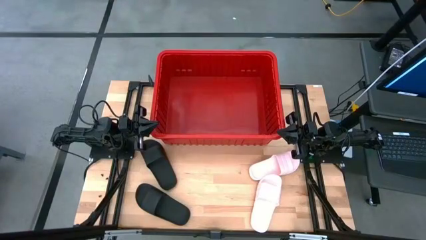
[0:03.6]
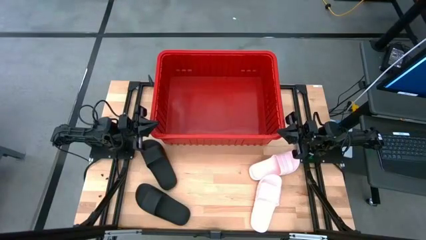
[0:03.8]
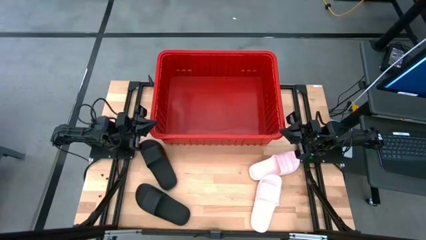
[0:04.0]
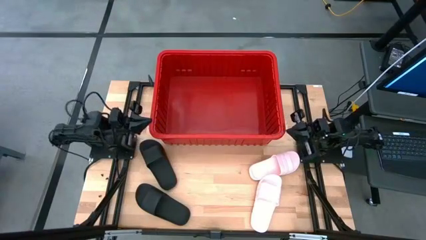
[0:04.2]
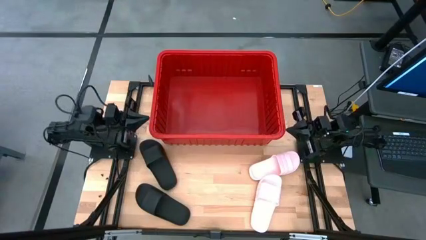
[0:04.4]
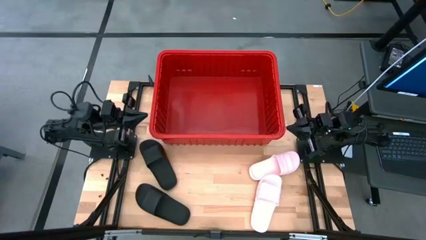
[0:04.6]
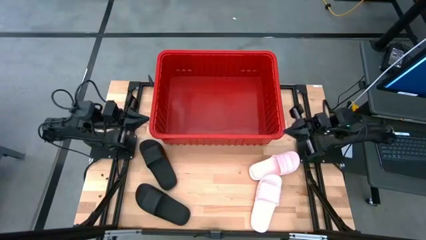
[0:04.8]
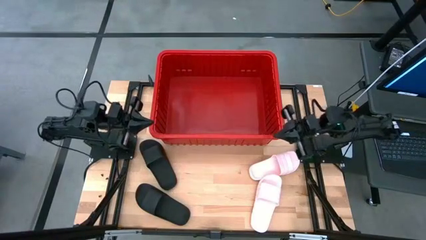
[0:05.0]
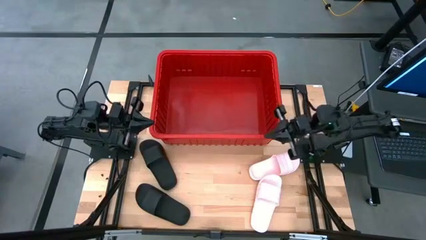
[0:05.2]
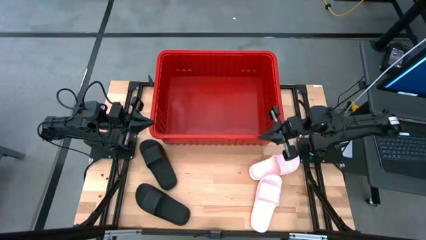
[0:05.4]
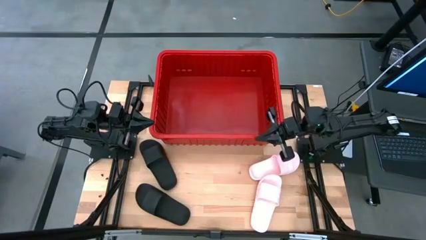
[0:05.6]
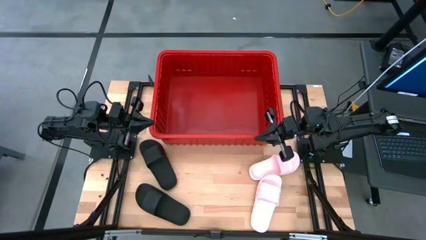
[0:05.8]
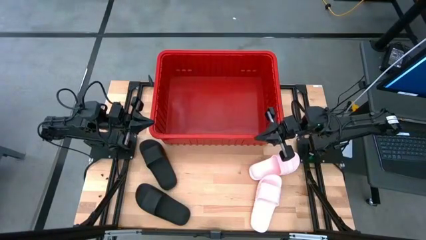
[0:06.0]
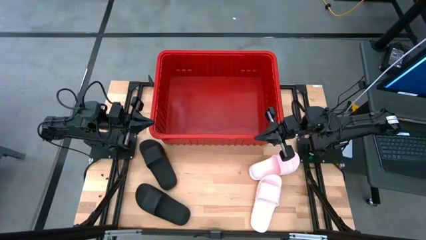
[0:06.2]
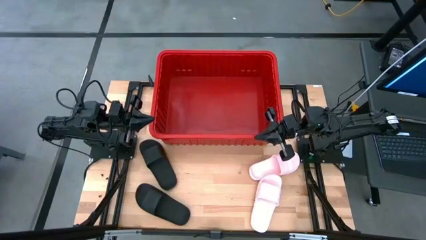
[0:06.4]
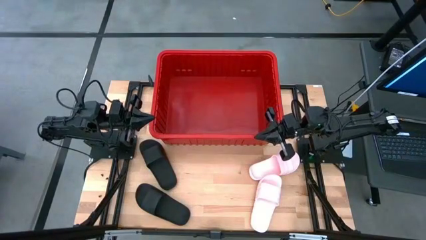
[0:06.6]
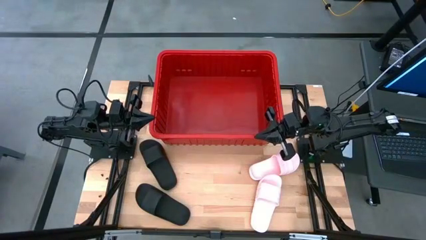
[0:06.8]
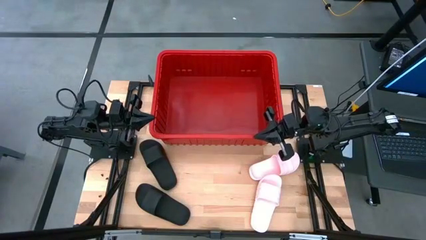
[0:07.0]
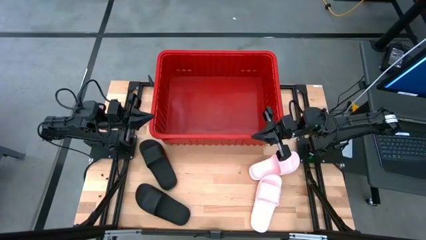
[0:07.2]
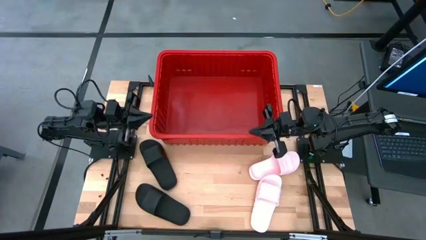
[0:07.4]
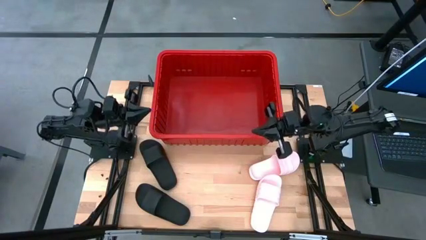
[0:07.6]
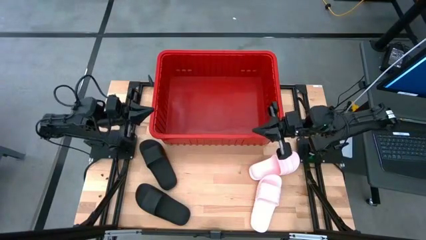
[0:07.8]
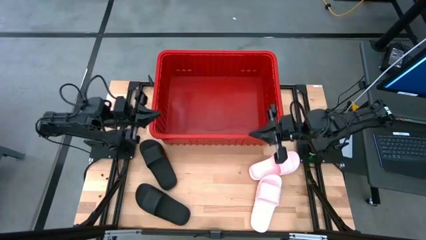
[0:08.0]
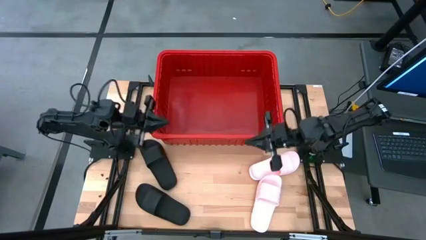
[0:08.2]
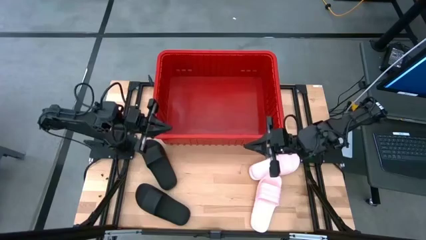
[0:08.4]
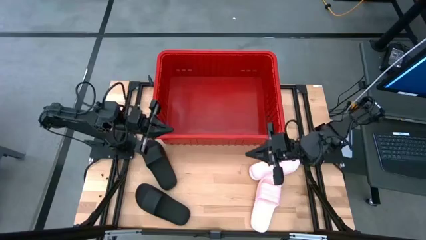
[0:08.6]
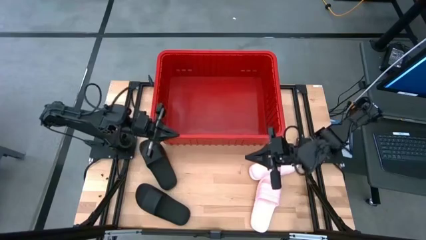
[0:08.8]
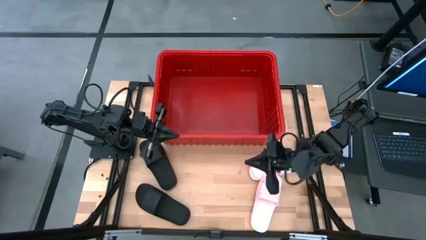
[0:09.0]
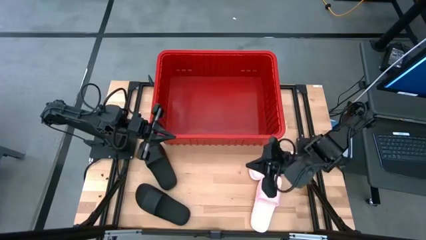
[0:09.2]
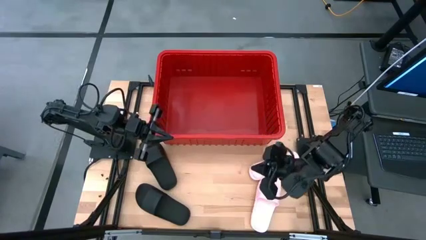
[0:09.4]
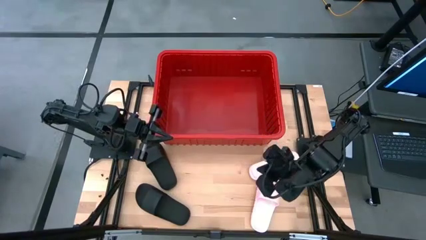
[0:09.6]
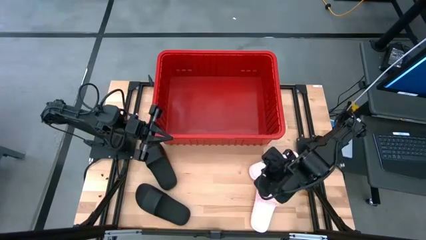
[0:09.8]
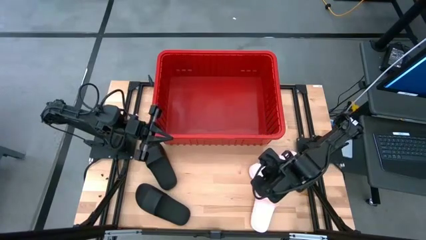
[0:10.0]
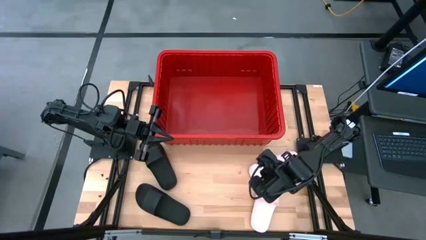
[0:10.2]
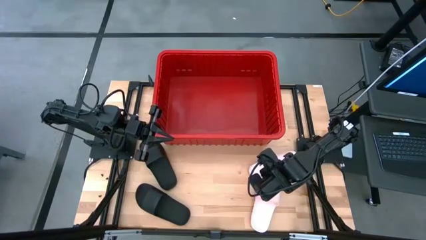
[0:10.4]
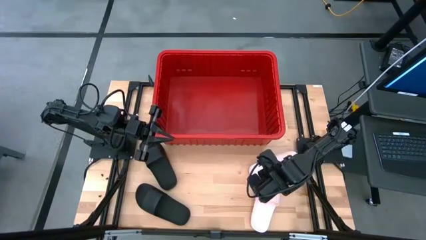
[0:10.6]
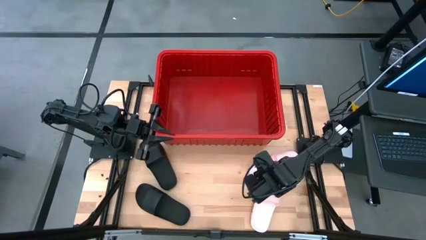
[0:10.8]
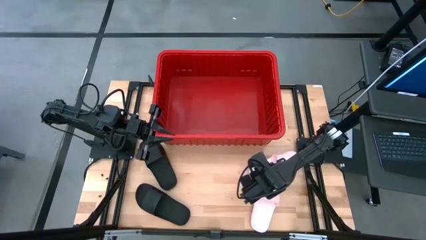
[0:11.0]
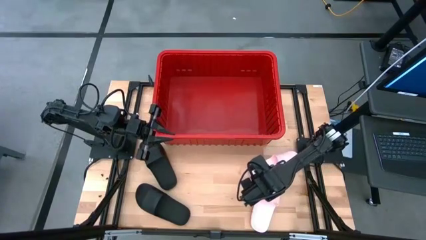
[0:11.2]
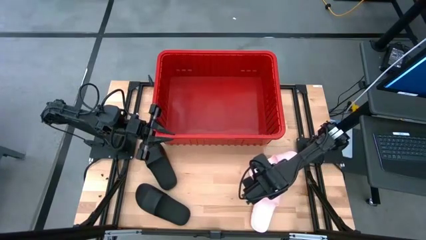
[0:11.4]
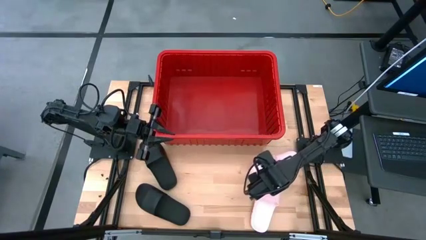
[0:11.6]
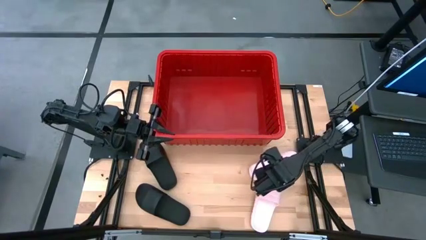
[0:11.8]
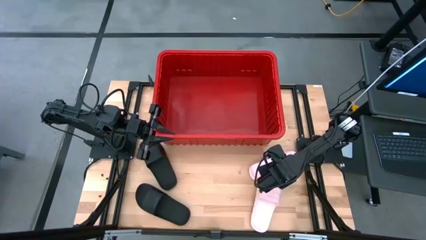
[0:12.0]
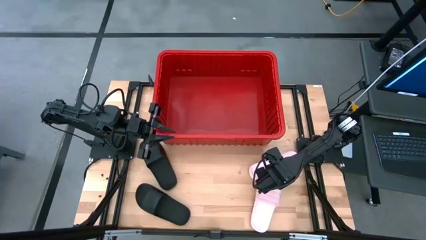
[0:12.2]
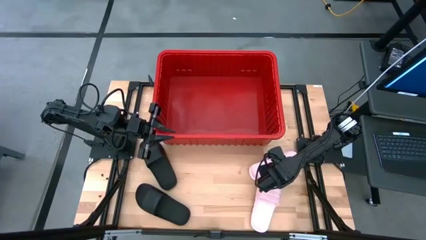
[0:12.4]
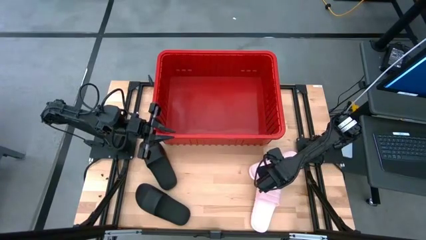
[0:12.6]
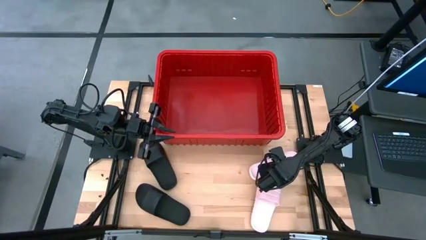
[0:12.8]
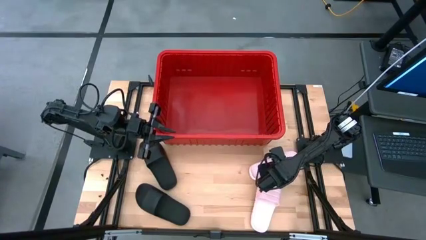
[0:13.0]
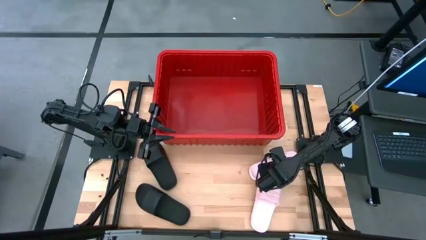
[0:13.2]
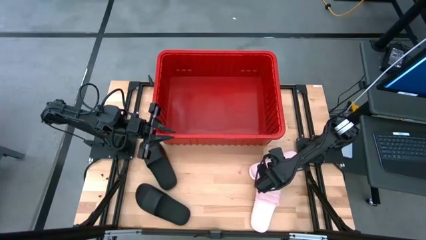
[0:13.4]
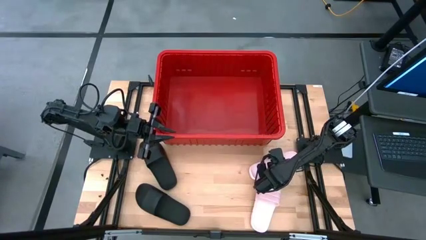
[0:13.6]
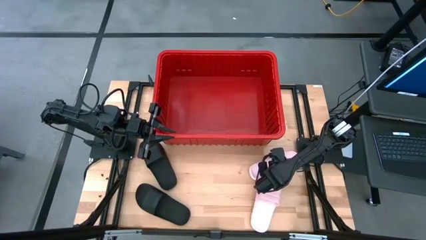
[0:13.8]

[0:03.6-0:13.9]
Task: Pick and place slides into bin
Put the top pink slide into the red bin

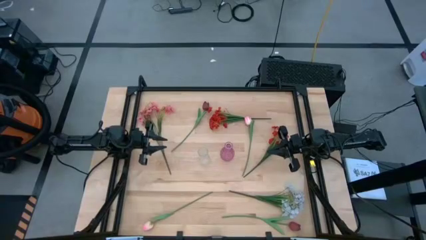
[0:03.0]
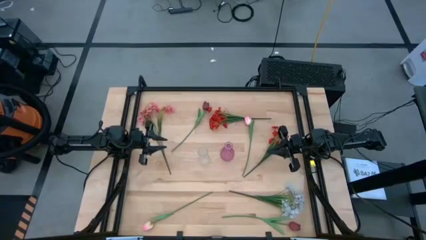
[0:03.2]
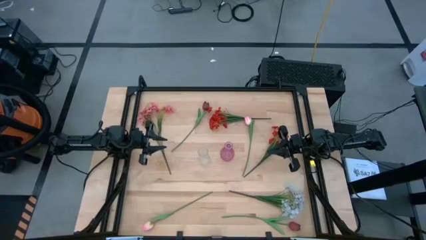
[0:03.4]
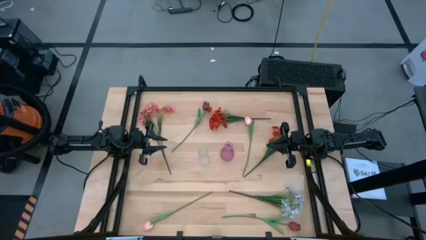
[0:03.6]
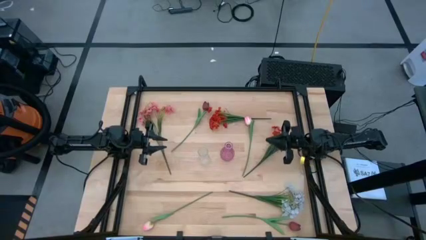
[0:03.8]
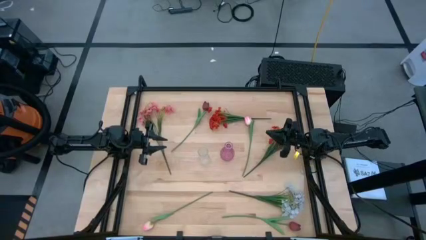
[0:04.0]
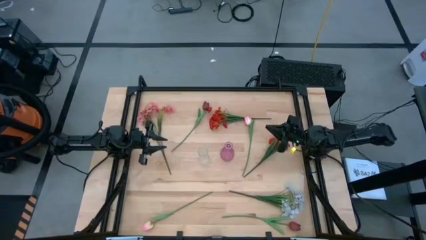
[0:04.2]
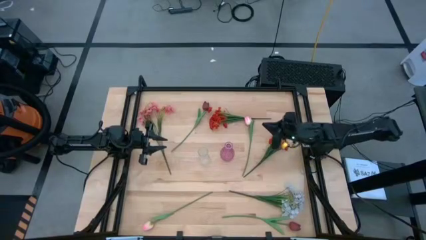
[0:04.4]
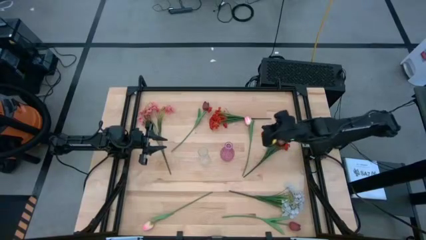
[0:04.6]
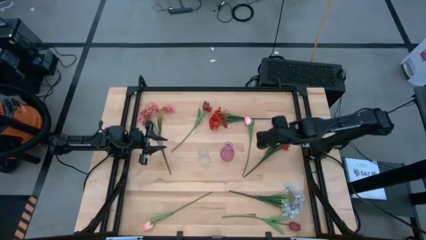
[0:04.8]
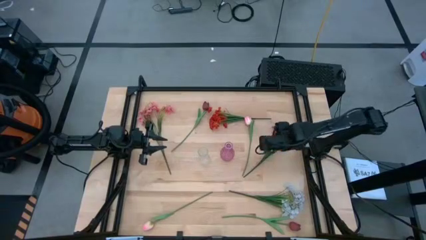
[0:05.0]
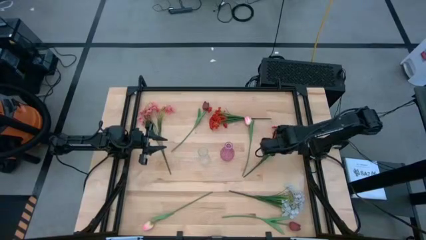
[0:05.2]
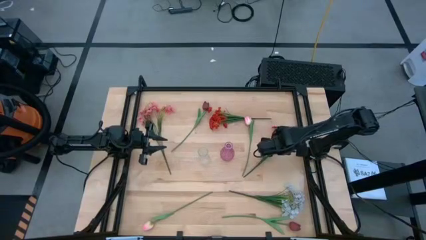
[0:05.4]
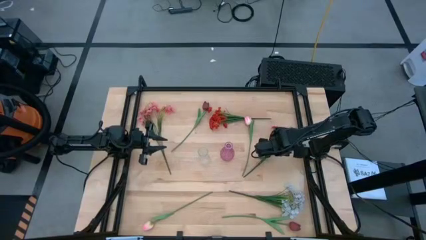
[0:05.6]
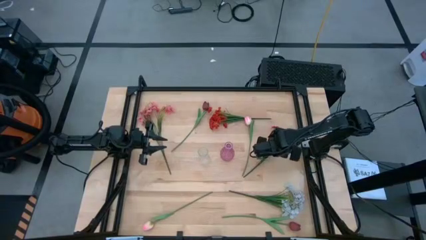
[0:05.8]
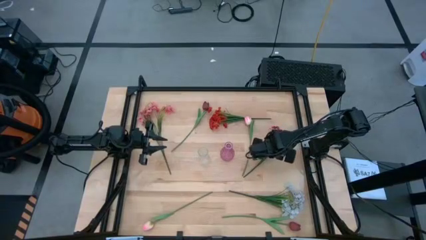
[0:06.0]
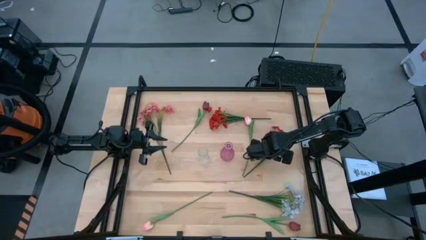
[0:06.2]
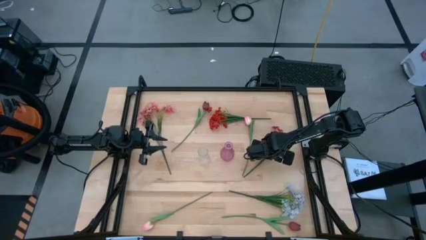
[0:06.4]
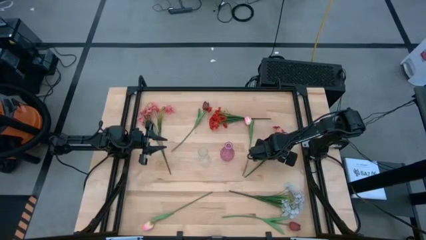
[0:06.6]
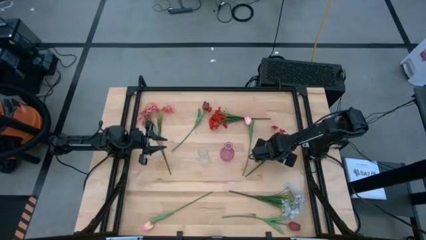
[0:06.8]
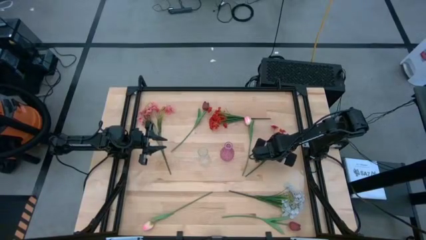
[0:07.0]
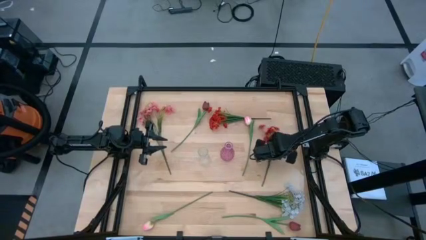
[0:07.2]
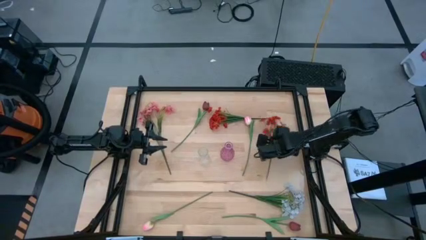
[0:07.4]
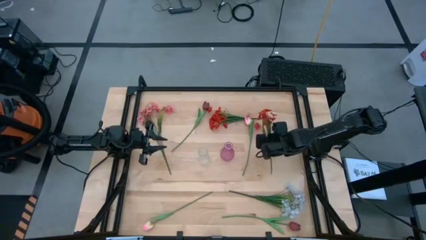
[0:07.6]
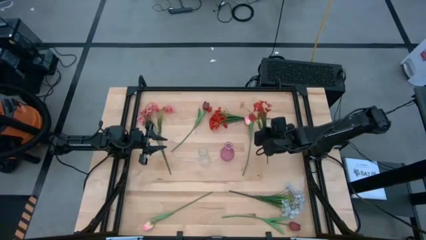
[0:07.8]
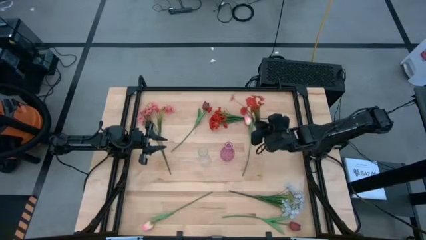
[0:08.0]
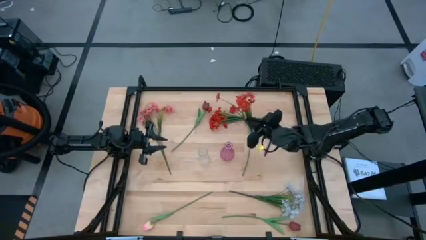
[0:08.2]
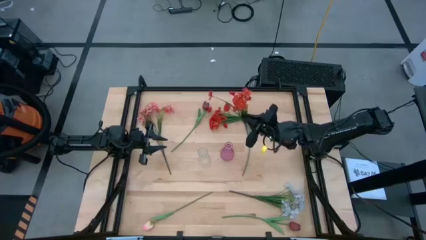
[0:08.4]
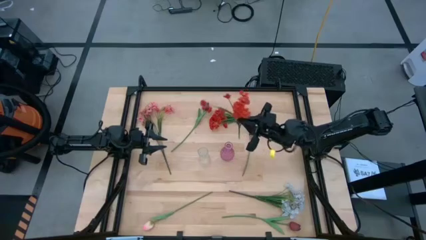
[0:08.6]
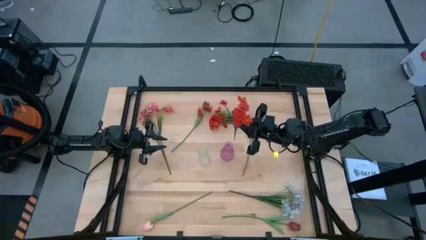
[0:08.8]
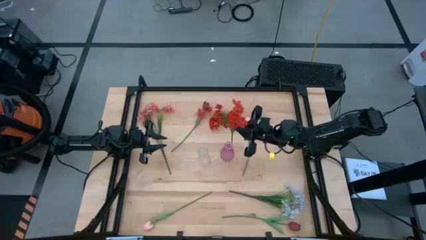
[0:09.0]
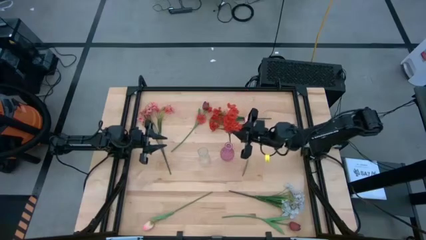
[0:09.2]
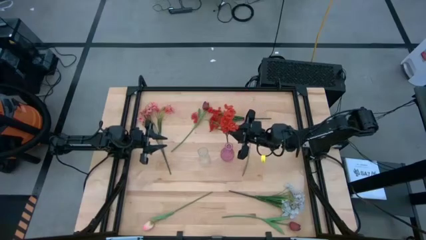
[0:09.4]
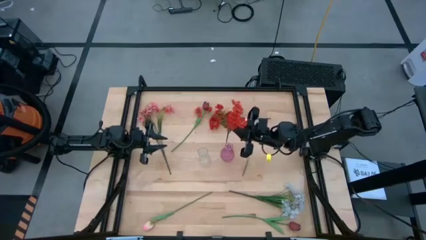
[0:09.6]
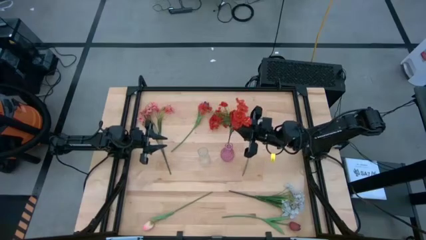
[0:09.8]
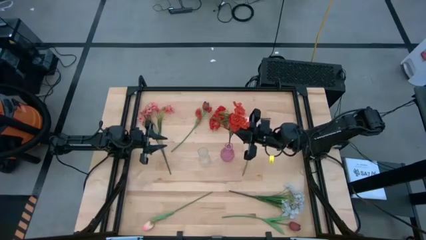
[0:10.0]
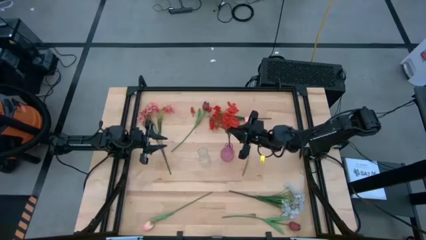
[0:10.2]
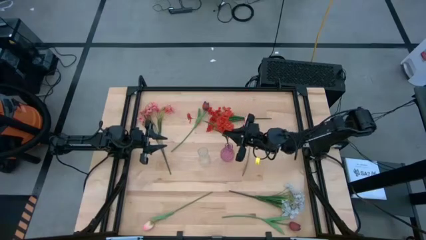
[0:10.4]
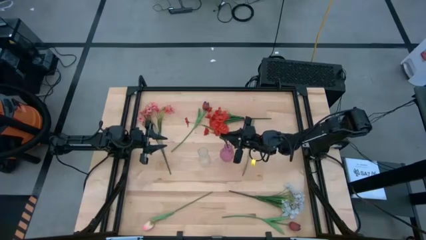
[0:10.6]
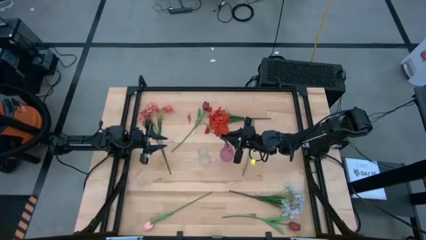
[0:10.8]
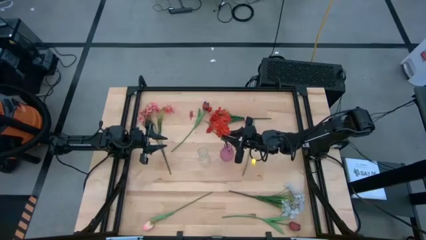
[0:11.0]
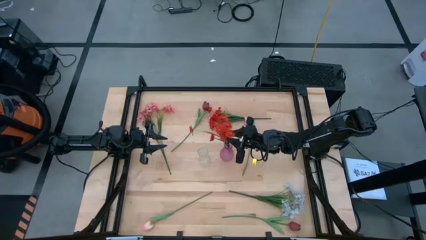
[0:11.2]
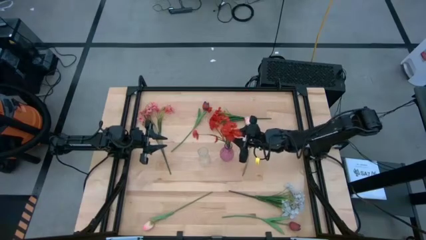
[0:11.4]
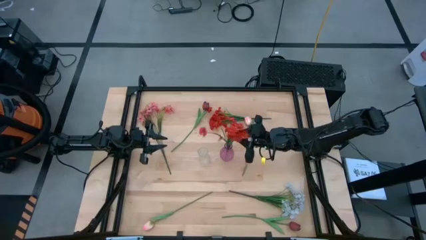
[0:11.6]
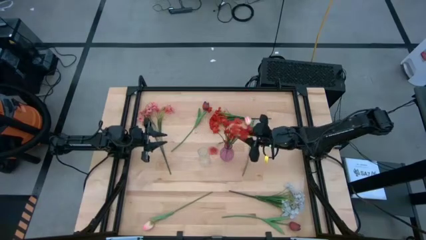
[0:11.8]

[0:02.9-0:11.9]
Task: Sort flowers into vase by color
Put the right red flowers into the purple vase
